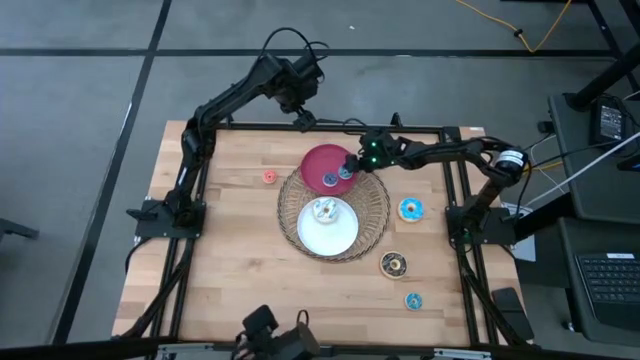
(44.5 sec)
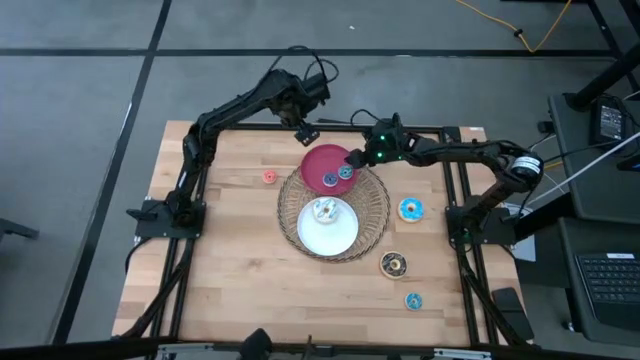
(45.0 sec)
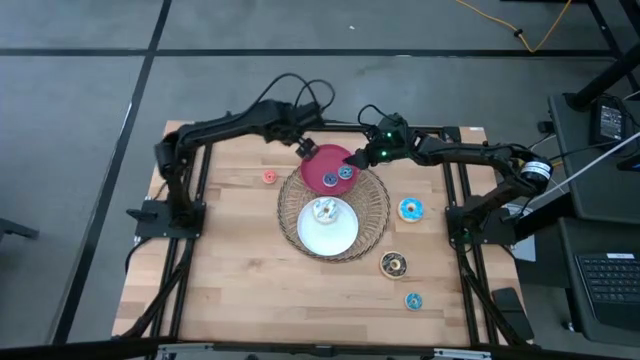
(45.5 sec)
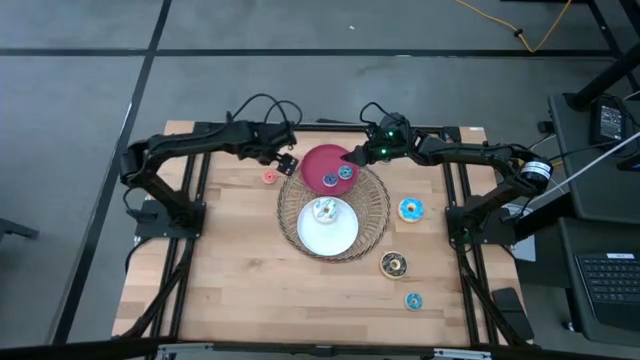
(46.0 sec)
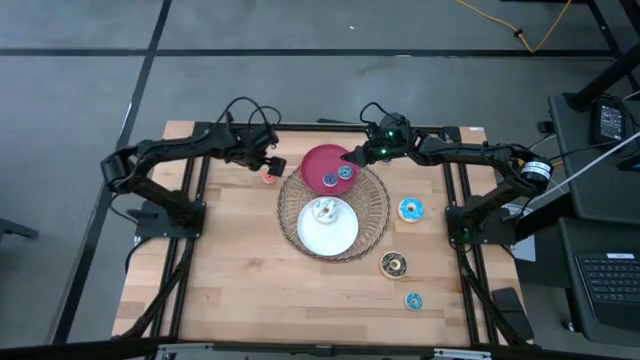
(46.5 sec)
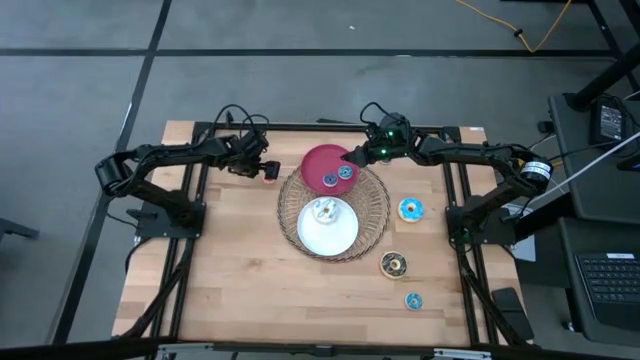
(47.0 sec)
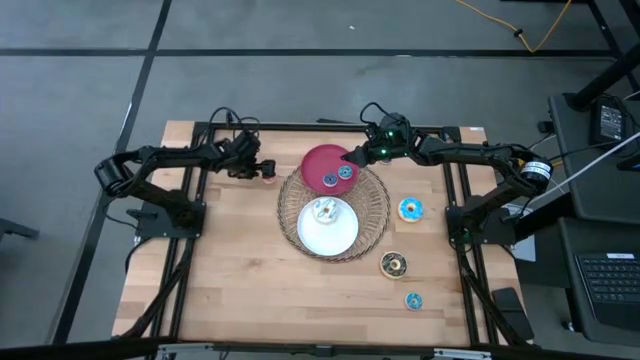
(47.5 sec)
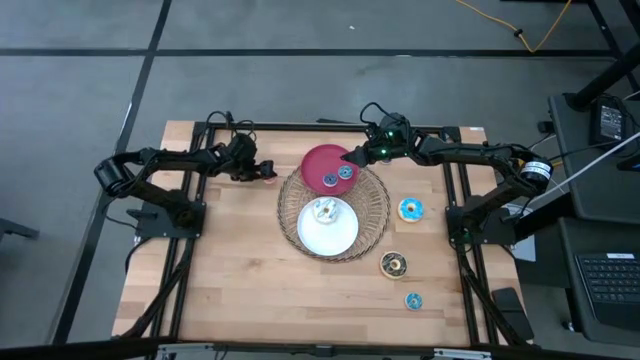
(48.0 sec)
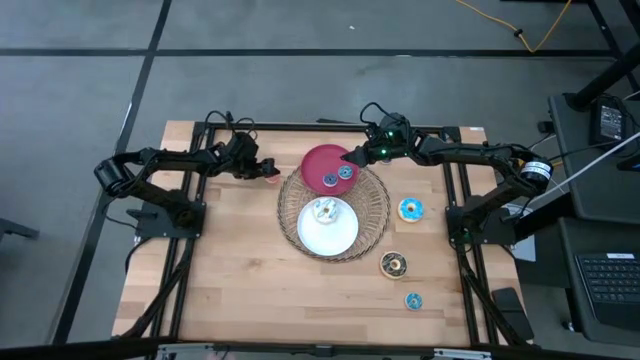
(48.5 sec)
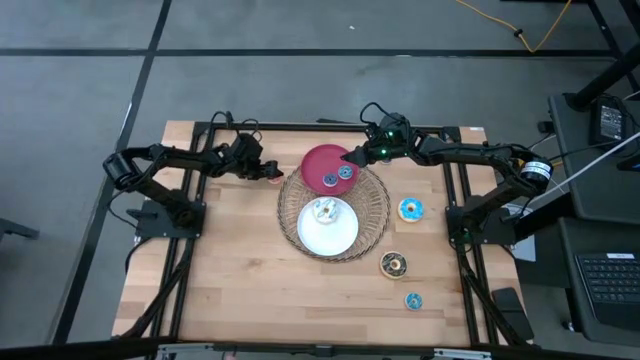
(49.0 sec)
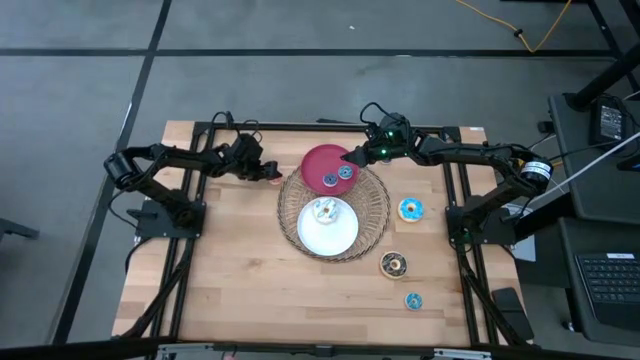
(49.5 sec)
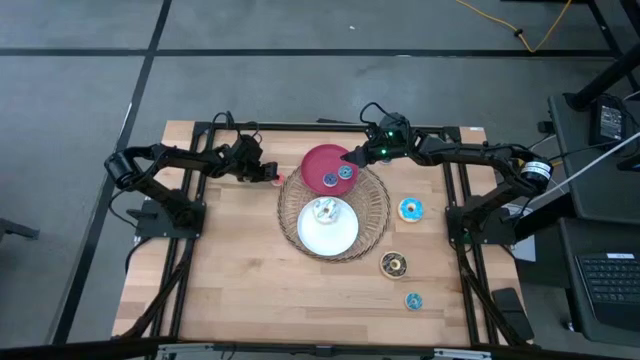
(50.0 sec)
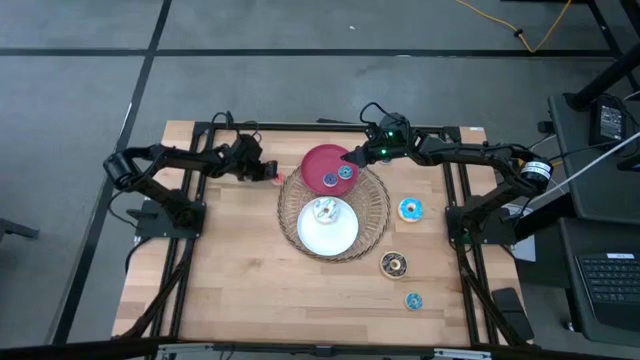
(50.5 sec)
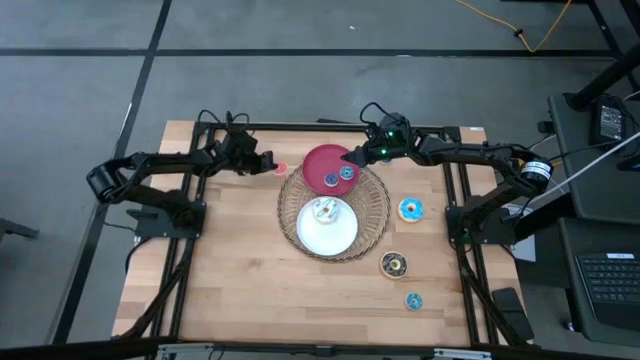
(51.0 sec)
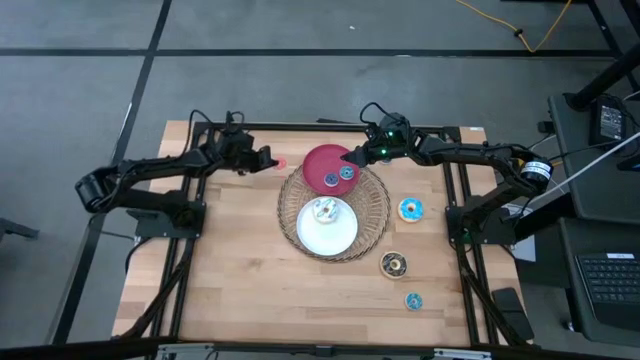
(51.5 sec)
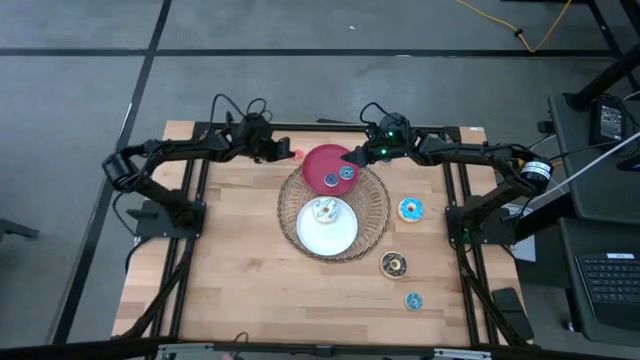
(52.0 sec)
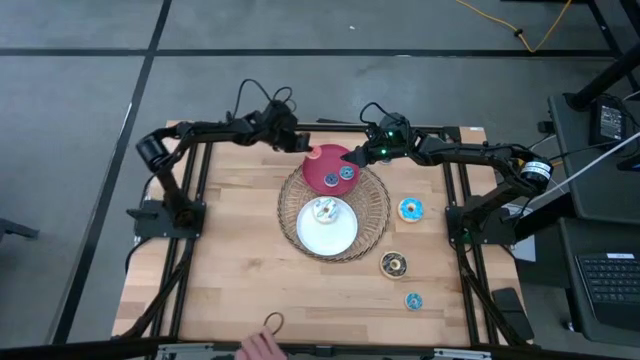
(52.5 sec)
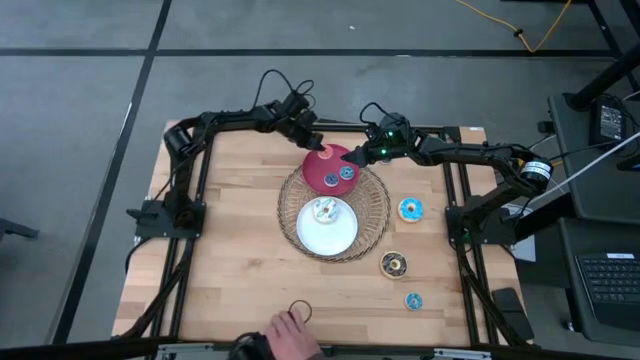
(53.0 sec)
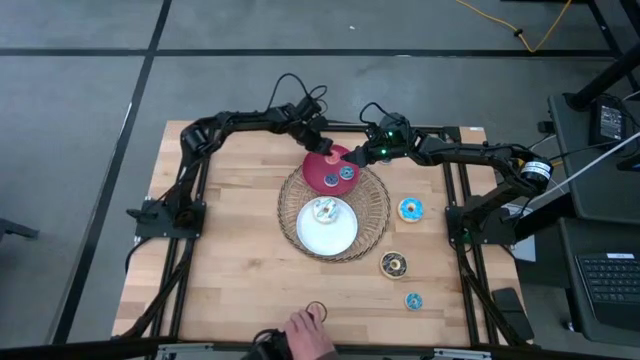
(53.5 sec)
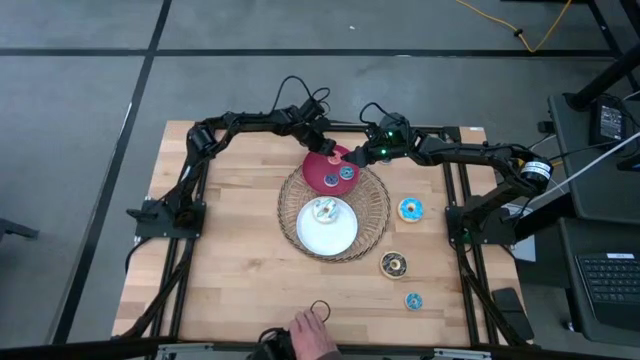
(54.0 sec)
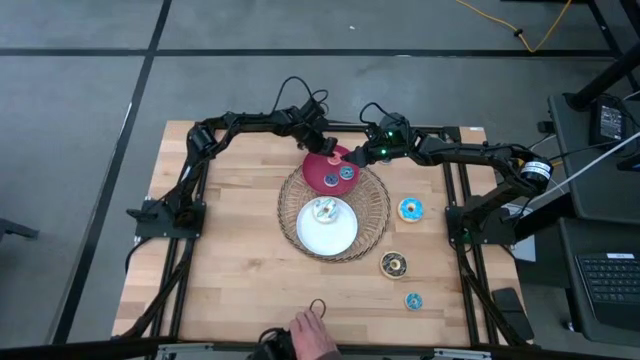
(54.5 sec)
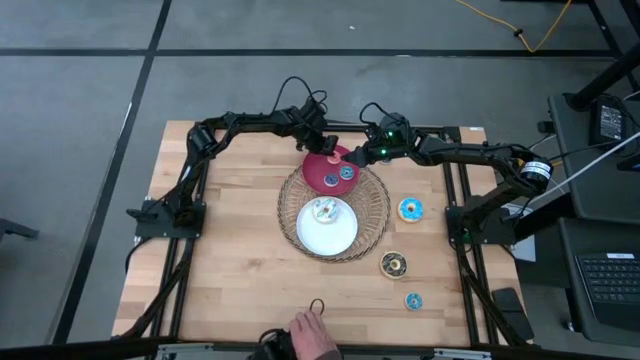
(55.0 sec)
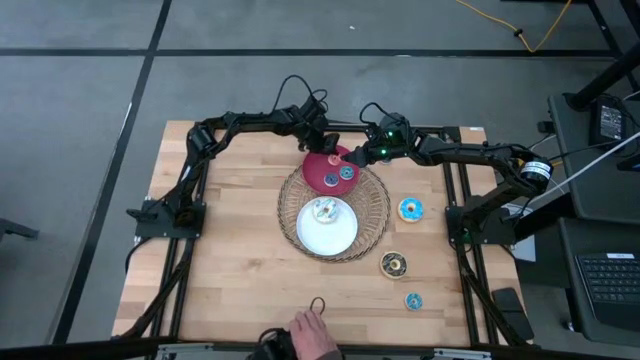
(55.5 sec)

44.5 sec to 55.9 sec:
Task: Pick & Place donuts
Put the small pink donut on the red plate

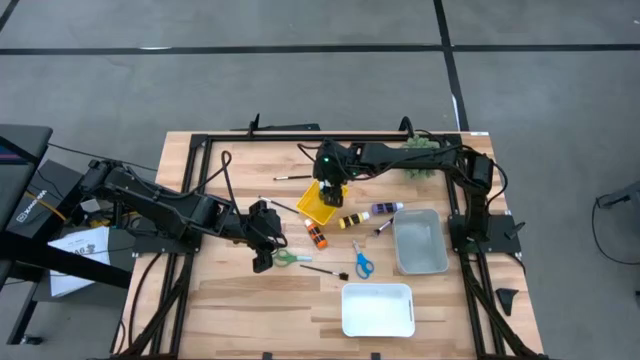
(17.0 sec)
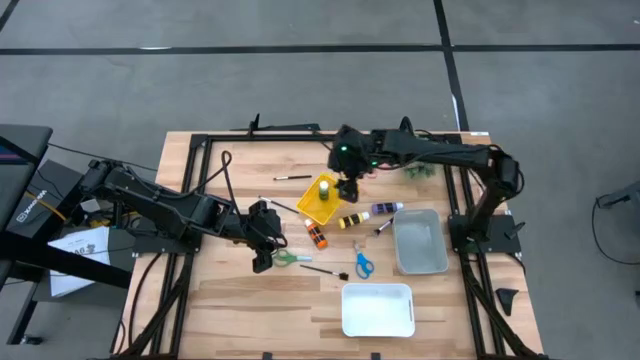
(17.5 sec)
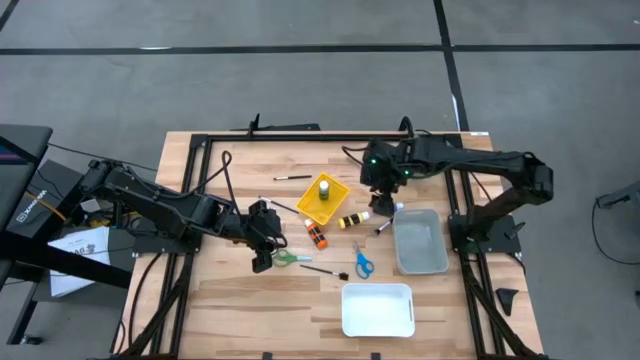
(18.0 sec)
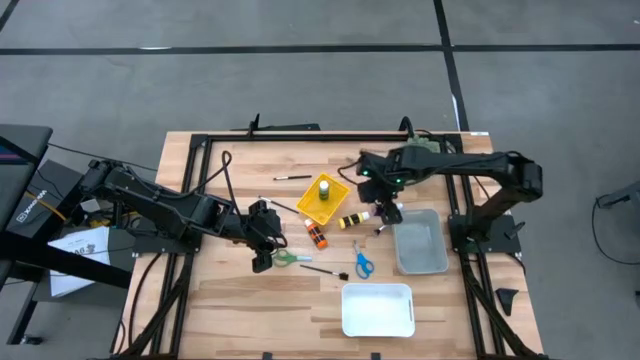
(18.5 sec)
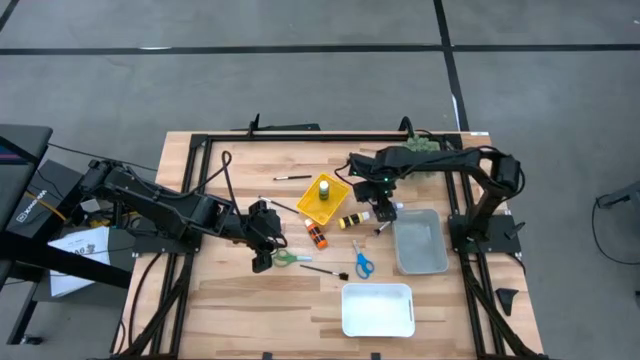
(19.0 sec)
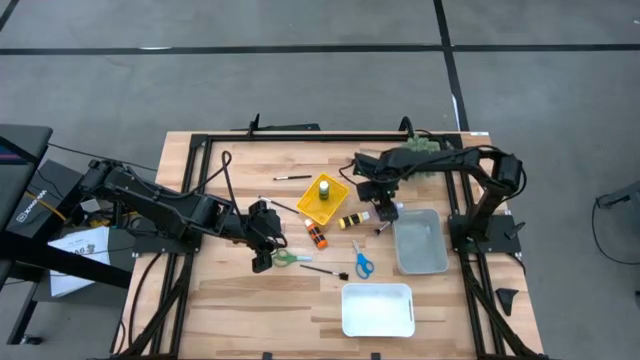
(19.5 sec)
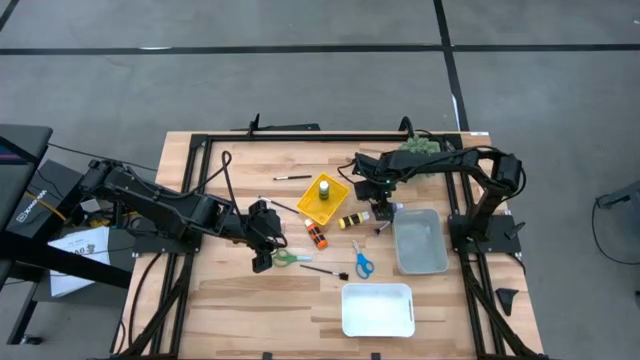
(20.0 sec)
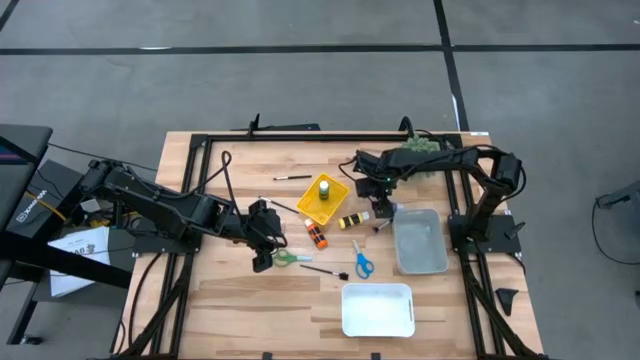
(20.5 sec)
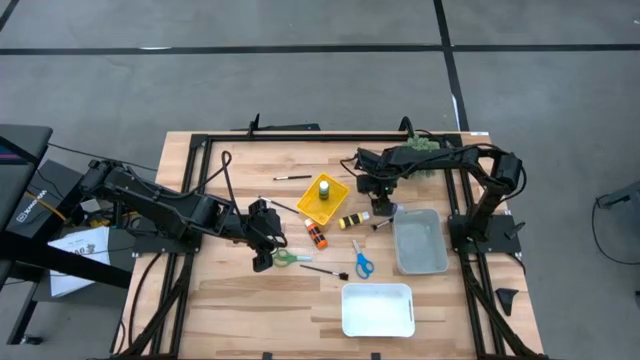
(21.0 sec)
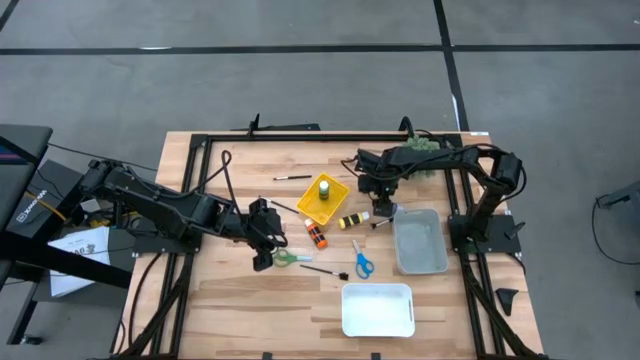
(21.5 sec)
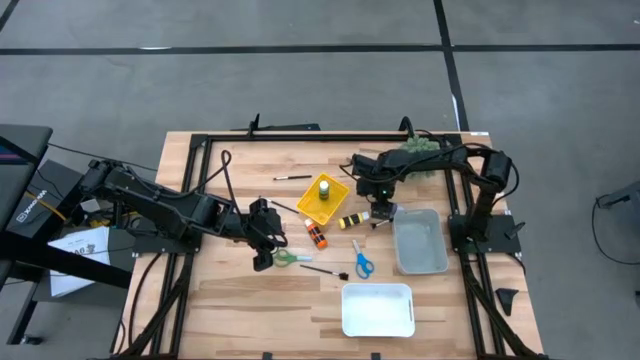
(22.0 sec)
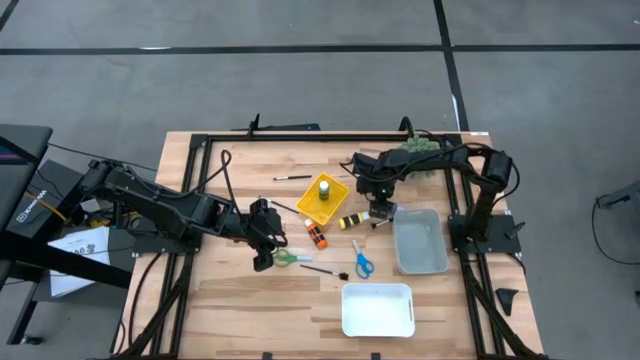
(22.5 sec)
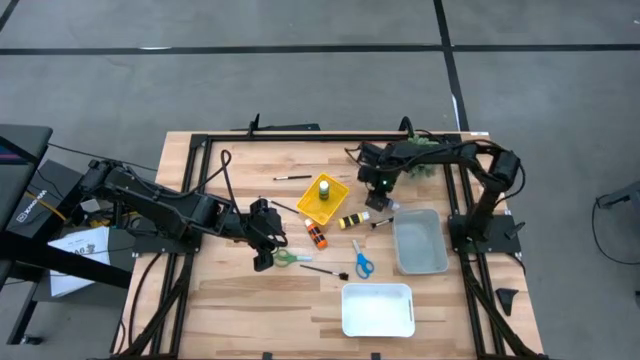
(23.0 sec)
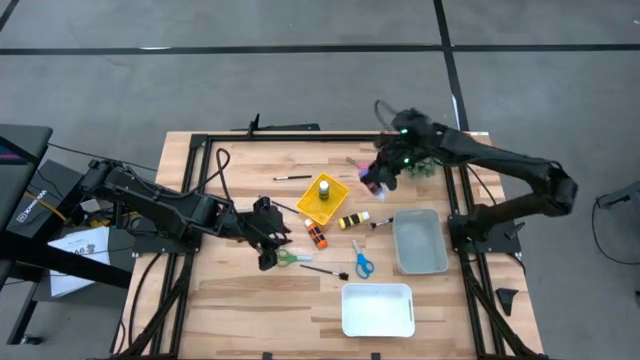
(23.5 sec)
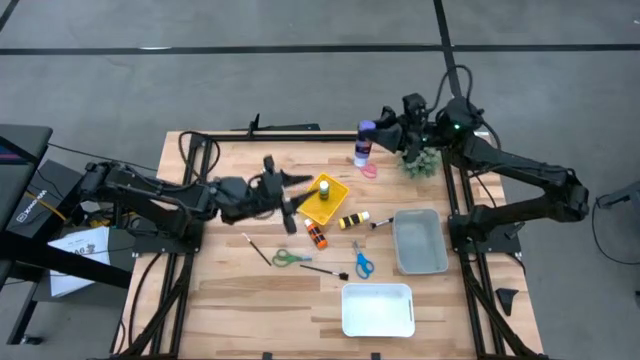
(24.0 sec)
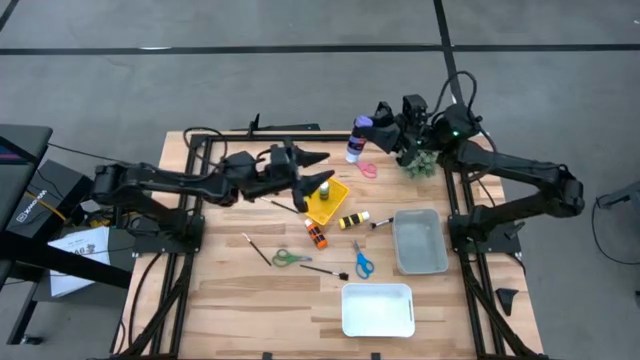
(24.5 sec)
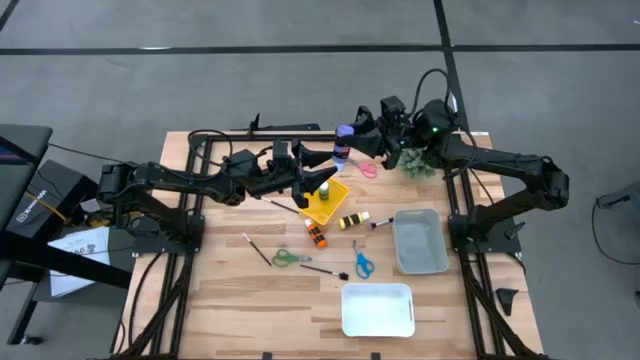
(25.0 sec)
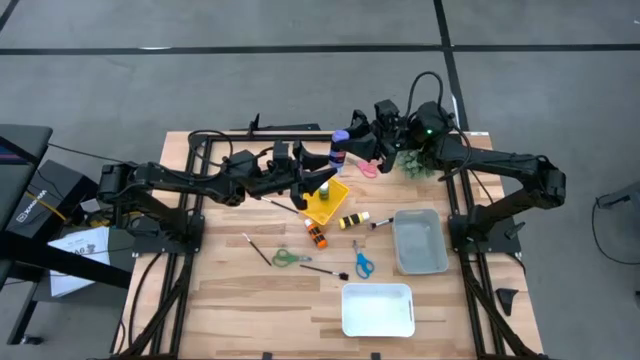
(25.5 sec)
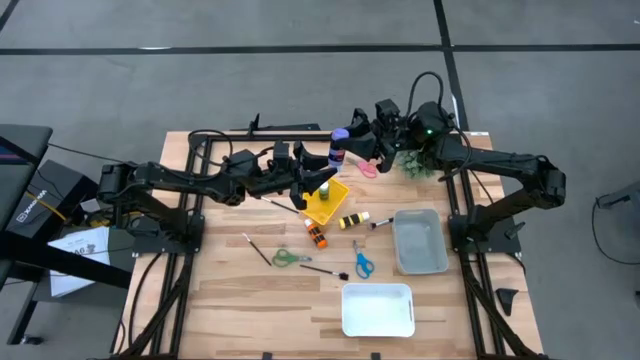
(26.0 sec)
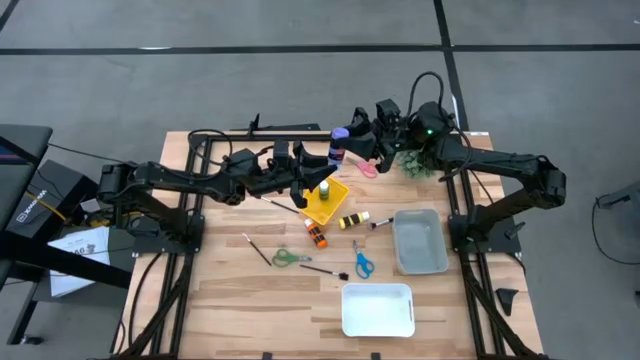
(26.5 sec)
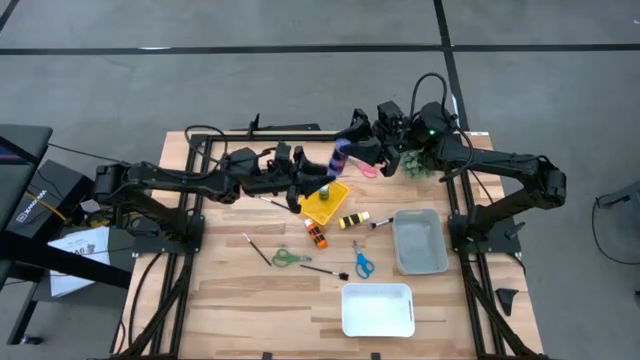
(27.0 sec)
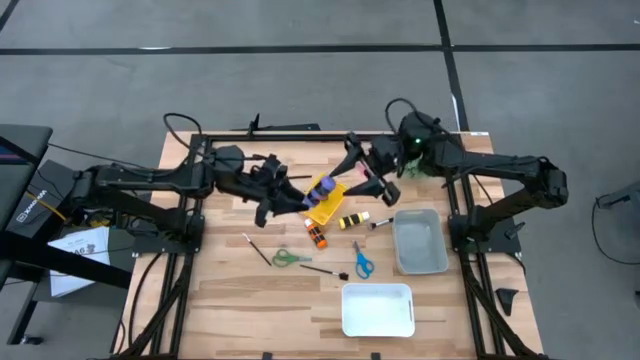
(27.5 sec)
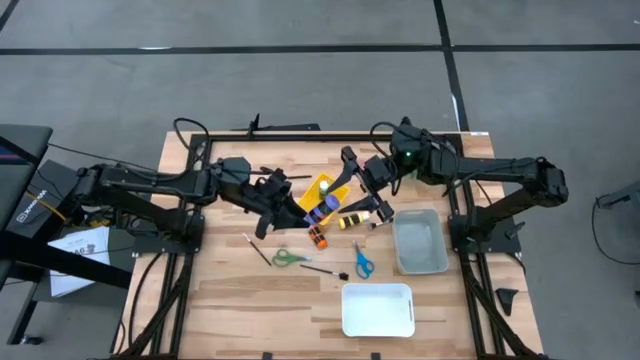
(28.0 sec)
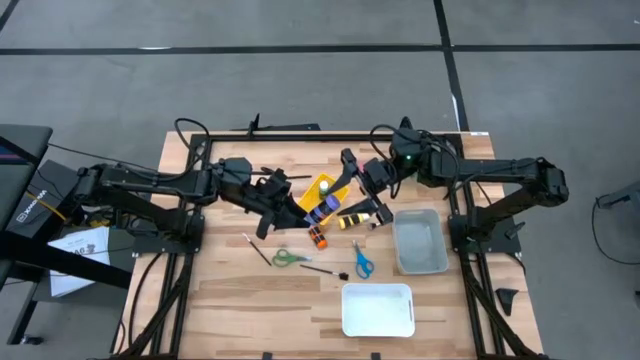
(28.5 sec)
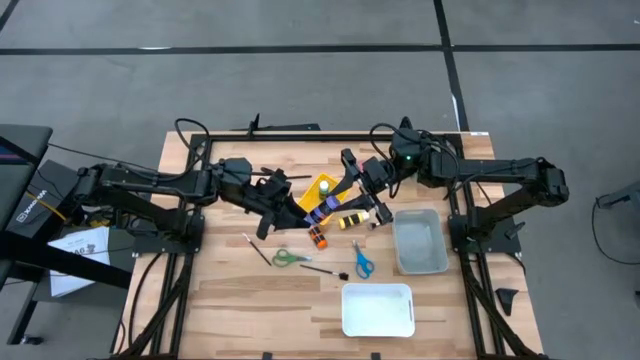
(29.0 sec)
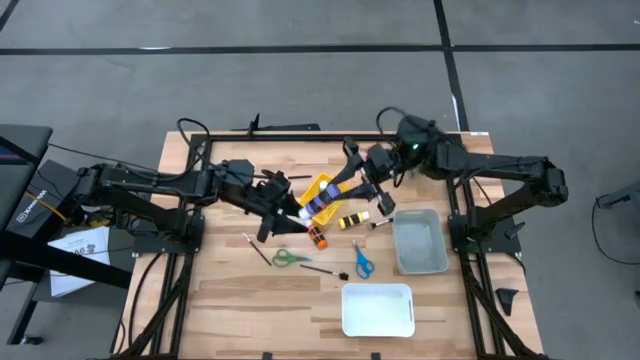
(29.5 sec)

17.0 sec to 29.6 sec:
Task: Pick & Place Paint Supplies
Put the violet paint bottle into the yellow bin
